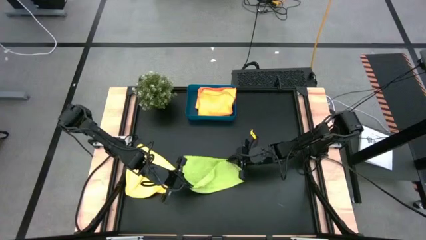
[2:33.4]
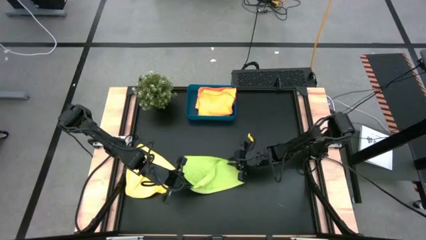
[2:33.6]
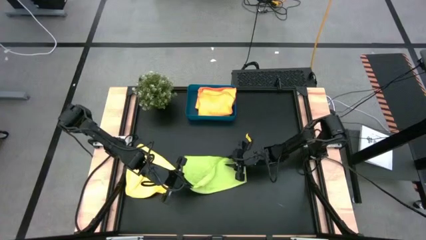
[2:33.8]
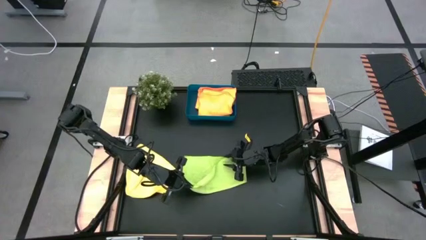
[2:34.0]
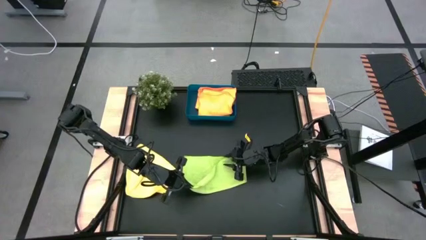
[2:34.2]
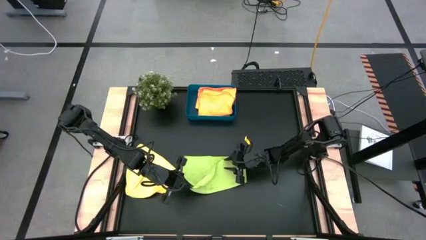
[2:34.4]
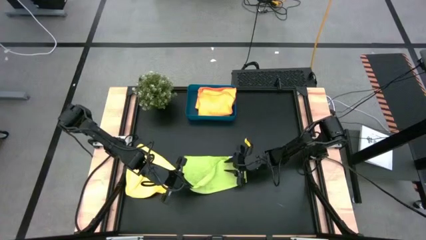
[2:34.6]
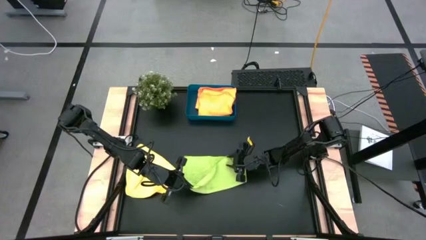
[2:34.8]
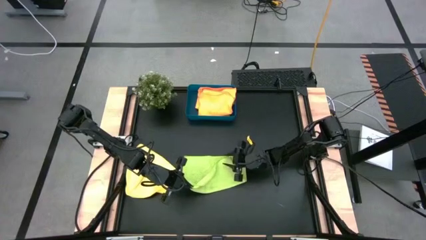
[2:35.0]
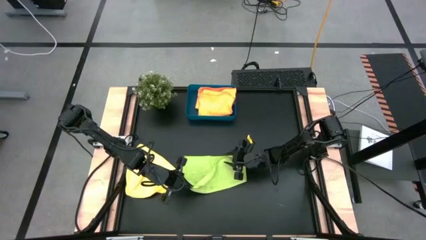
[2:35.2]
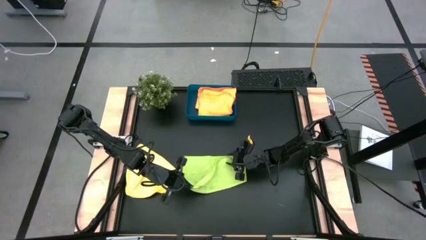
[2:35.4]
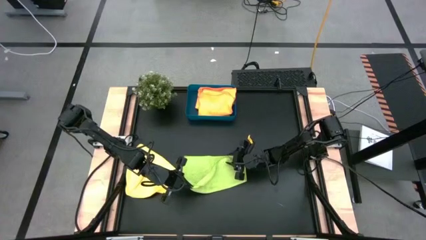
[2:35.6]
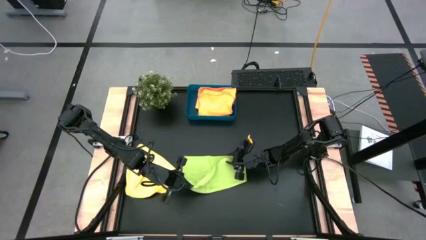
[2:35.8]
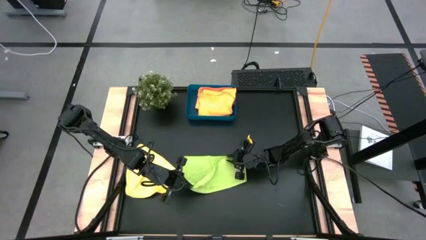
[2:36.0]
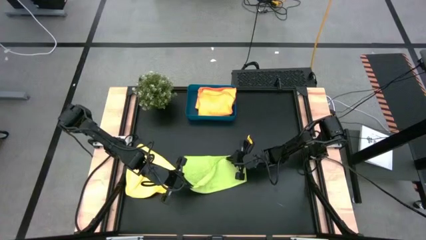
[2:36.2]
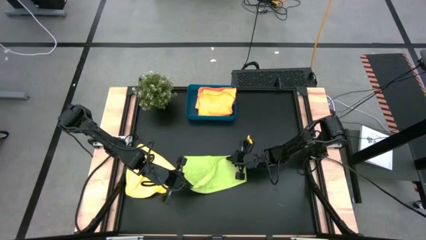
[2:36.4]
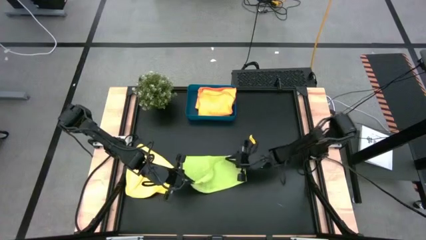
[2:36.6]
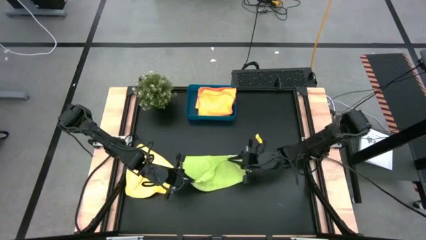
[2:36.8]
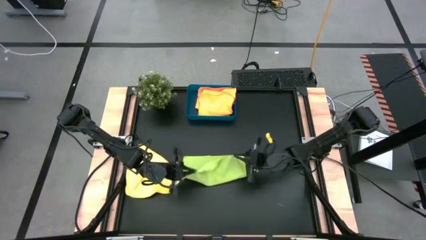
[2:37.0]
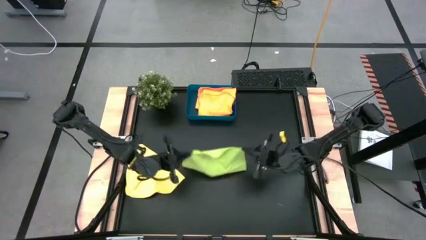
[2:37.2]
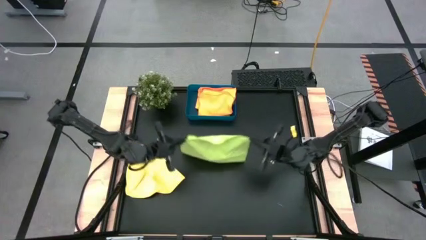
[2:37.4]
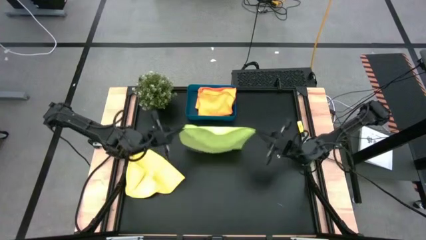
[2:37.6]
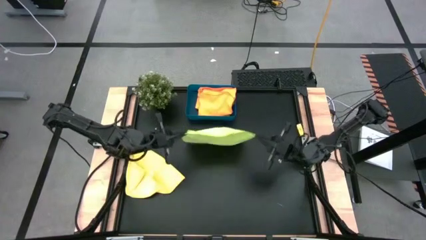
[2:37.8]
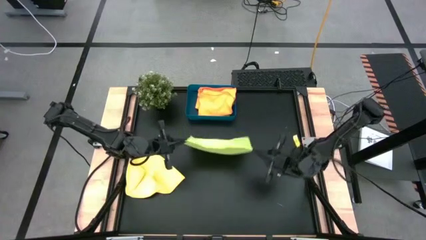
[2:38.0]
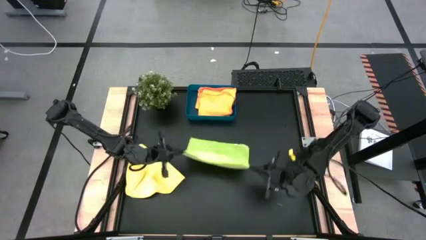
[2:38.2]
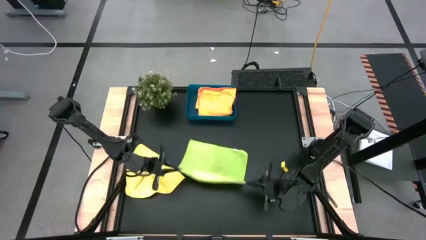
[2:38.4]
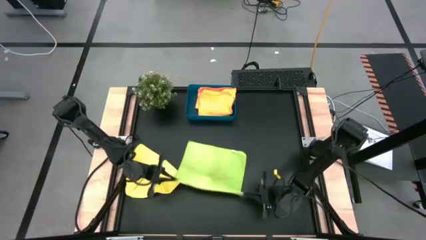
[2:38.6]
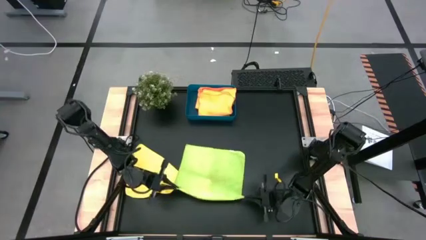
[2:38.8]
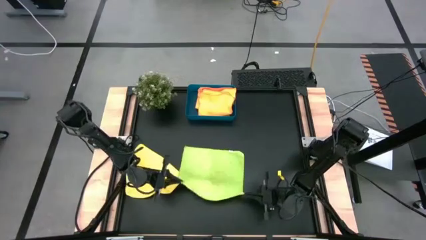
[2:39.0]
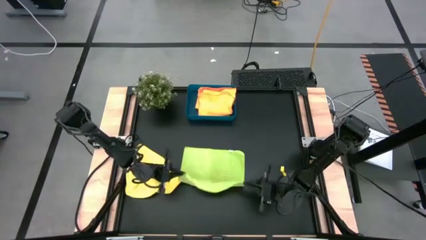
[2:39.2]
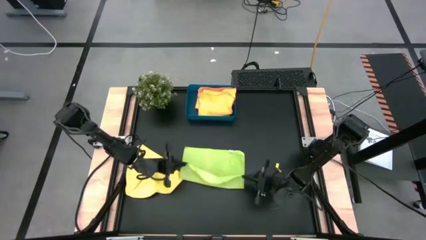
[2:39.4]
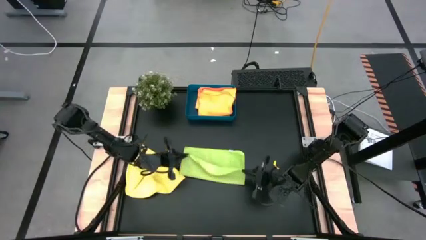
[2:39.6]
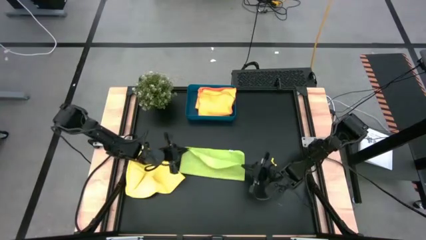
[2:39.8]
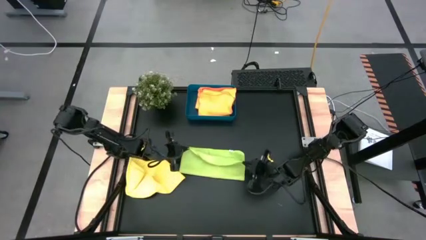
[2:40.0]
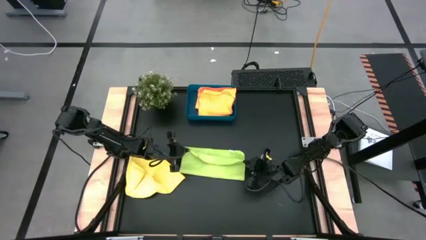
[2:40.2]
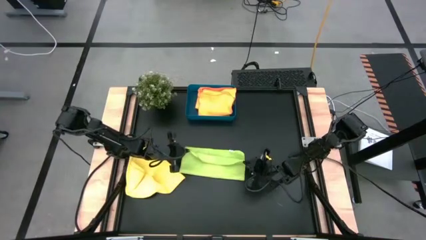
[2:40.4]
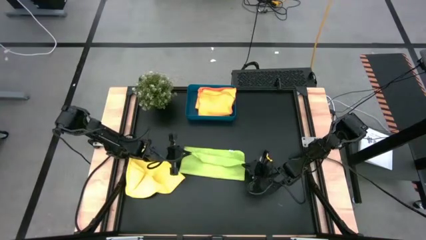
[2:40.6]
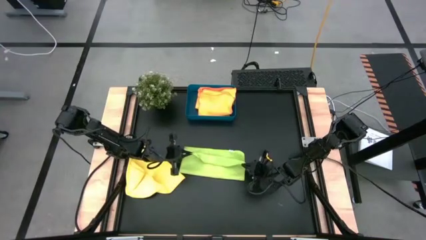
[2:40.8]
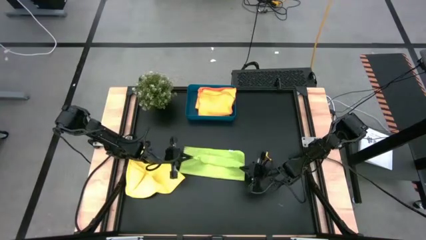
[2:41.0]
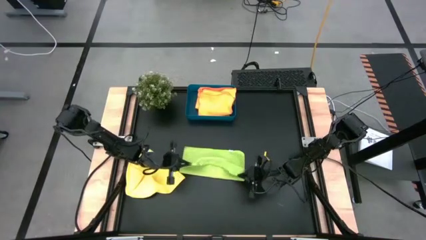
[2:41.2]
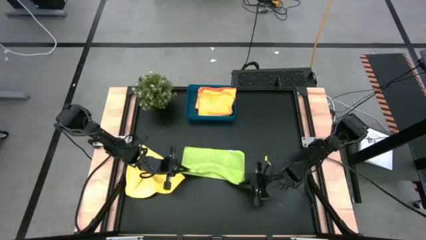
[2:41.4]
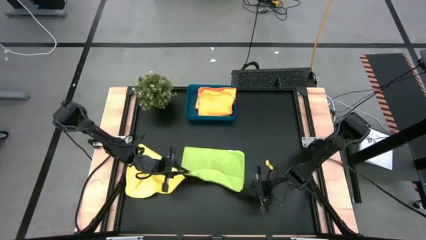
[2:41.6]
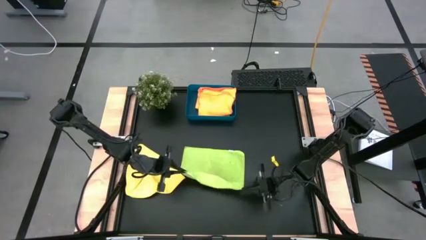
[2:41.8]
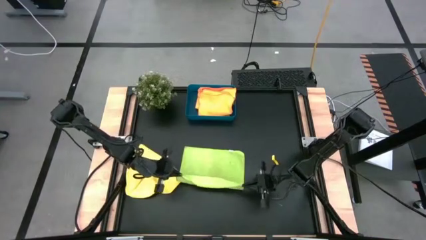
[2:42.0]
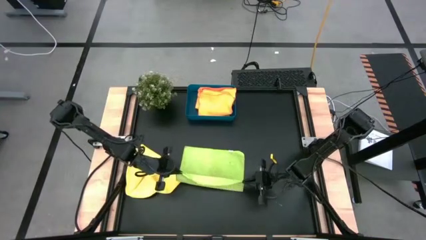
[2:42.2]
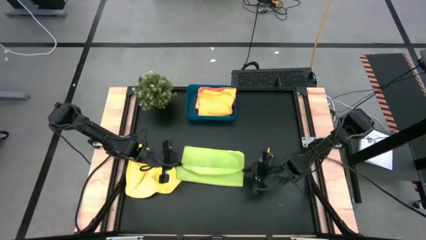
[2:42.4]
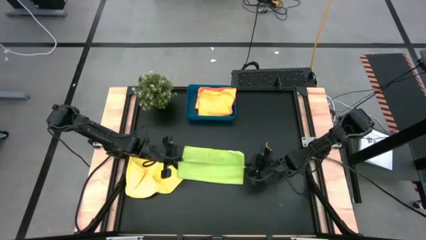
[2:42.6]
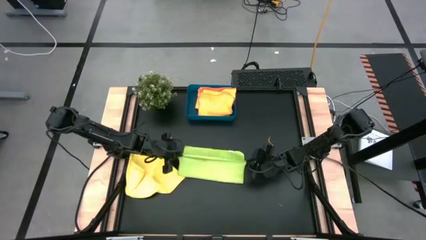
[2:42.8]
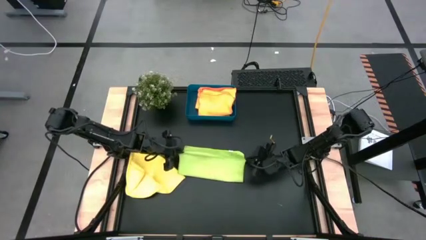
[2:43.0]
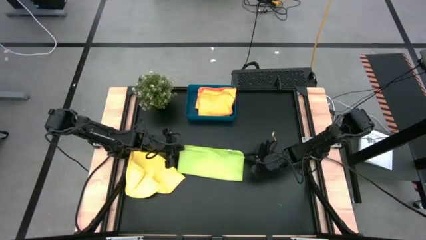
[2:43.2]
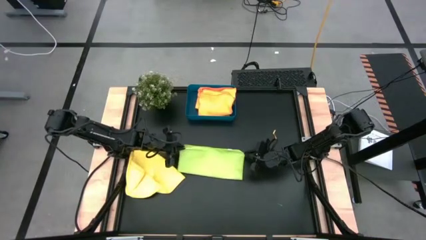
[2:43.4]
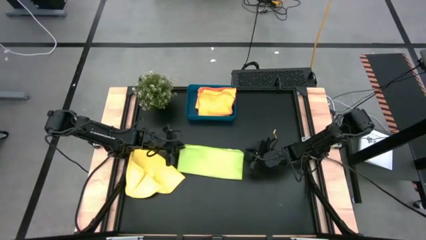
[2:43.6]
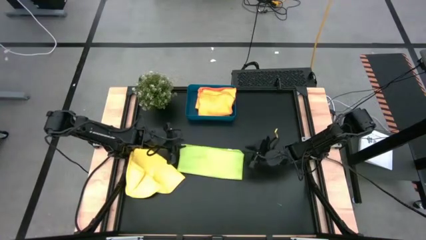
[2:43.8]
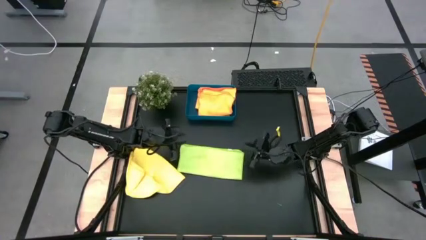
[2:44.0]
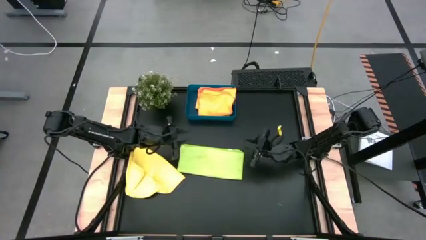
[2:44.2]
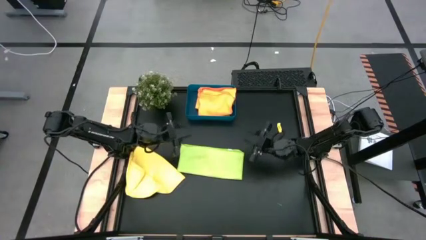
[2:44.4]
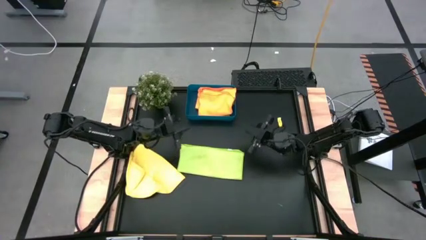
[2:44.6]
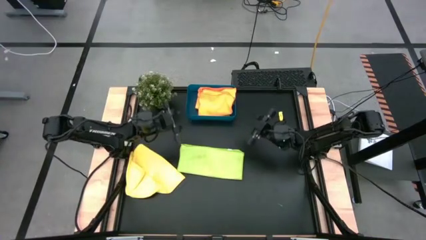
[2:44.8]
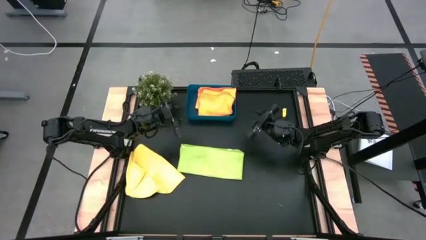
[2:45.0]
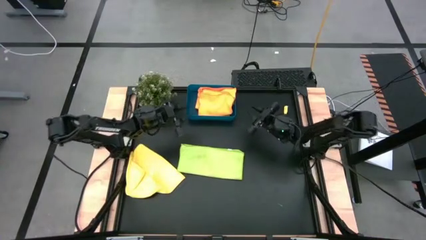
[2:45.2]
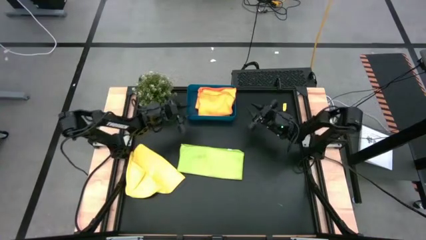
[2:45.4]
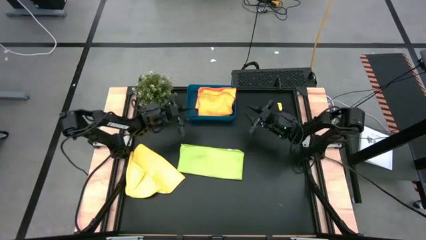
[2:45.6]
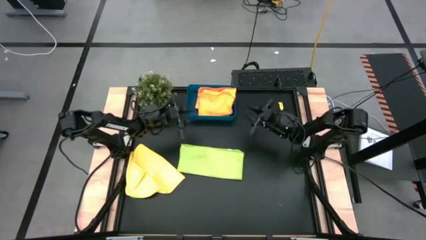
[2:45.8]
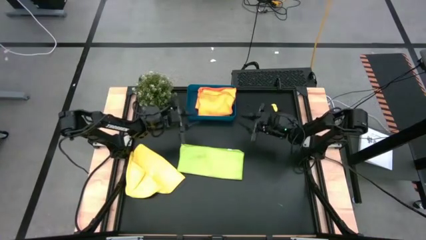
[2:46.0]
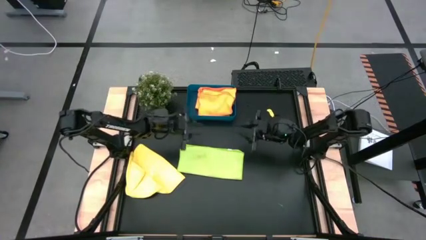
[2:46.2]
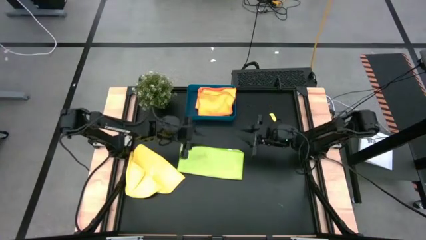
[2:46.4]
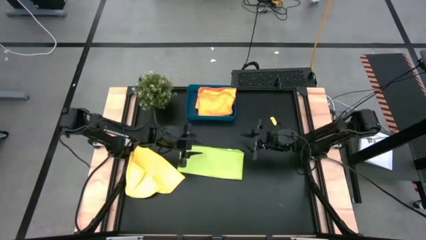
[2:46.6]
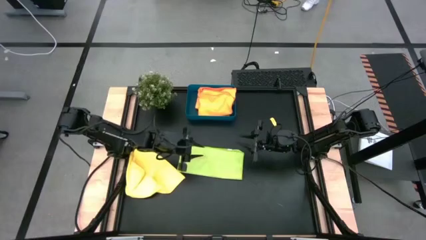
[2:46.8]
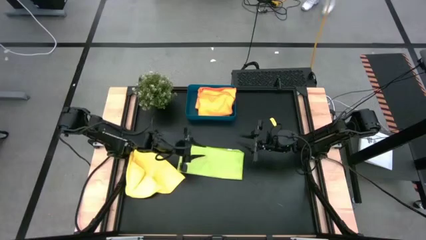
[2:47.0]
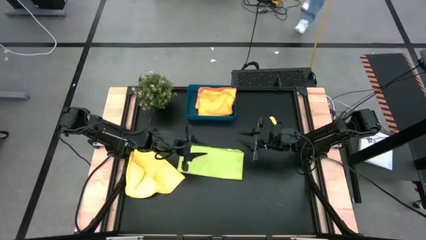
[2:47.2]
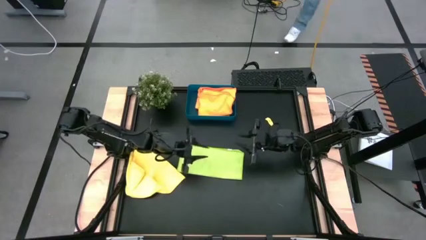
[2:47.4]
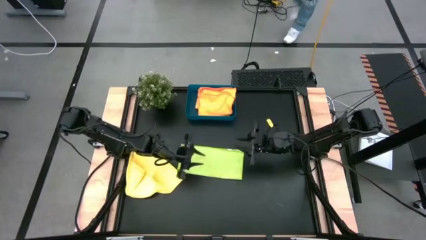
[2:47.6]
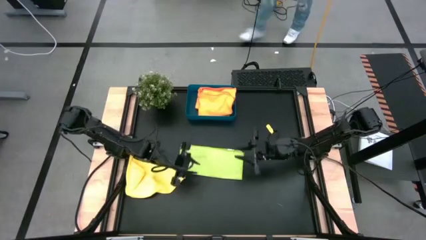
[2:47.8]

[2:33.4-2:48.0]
Task: Fold microfiber towels
Fold the green microfiber towel

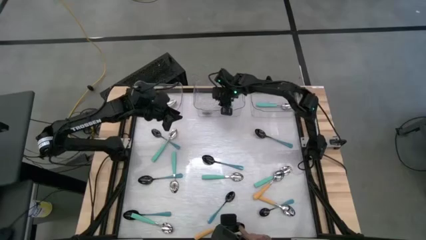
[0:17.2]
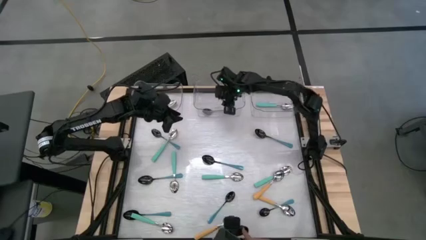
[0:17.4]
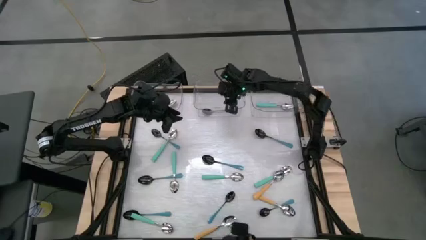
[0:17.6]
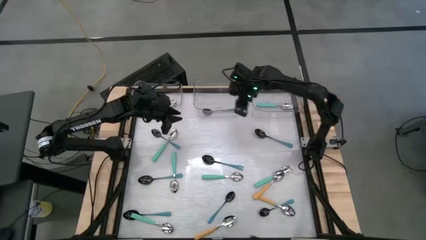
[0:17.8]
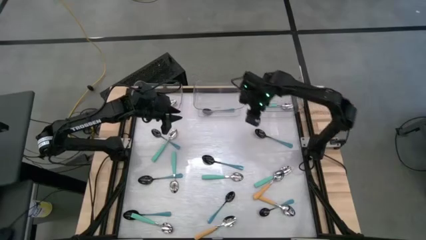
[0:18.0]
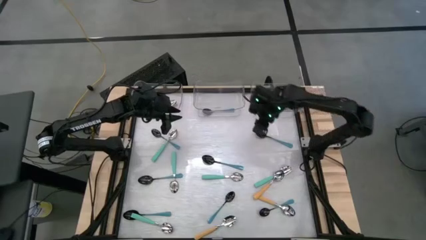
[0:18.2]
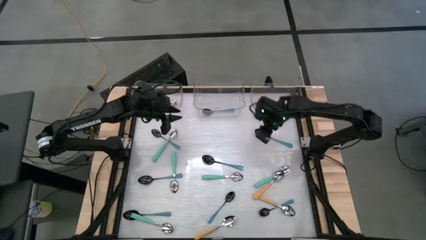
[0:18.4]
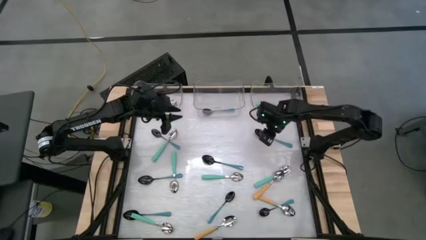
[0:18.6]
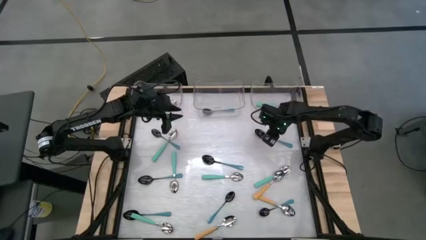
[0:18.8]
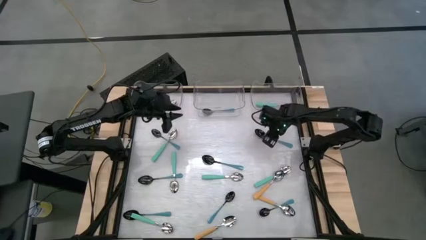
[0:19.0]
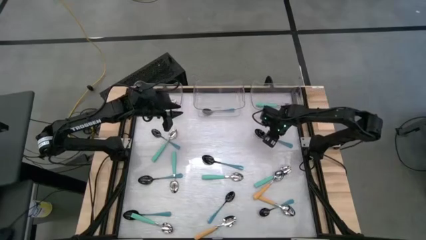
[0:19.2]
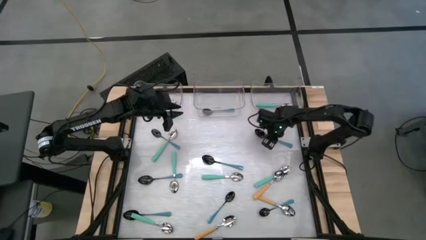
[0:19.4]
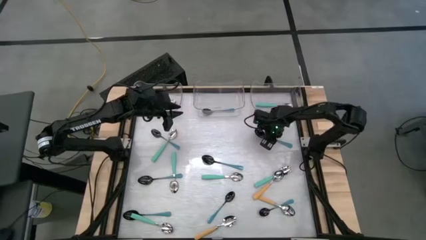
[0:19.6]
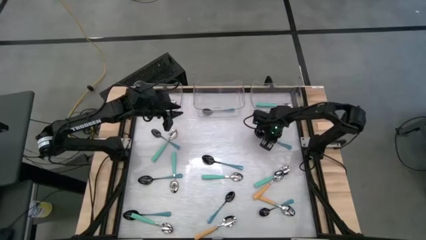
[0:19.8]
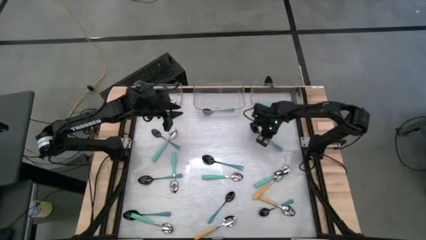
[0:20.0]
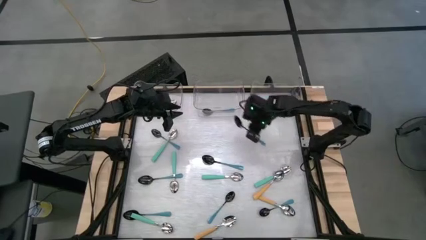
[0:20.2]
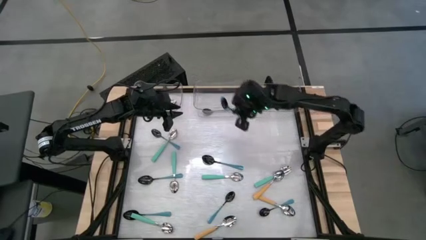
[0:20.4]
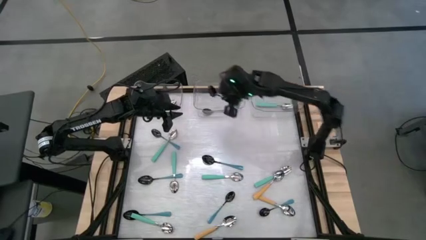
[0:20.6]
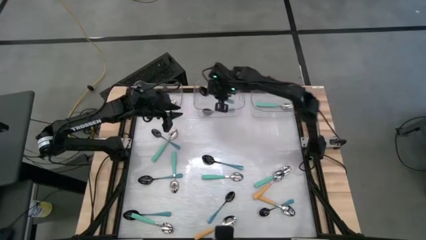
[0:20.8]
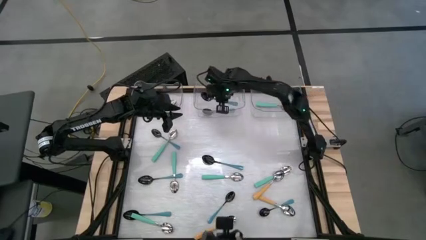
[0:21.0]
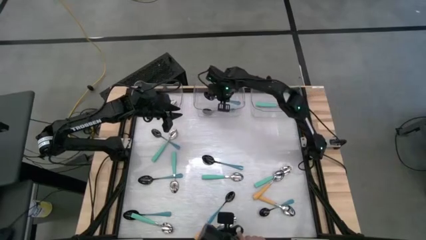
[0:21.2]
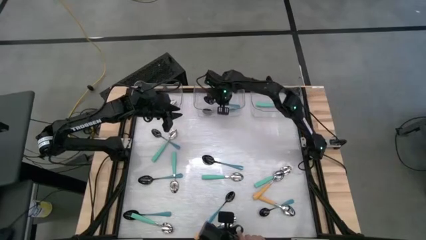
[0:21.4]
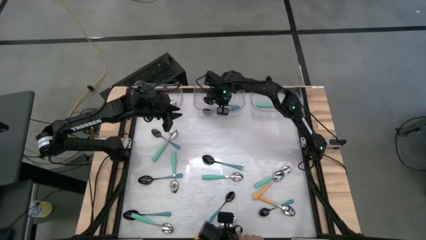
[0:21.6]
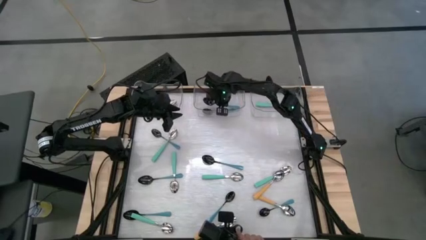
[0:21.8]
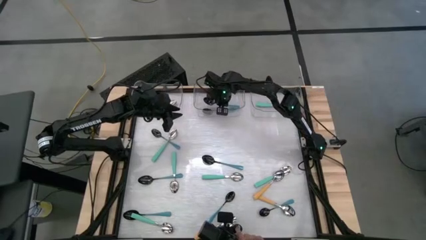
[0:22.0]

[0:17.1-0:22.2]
Task: Sort silverware by color (type)
Put the blue spoon into the middle transparent bin
